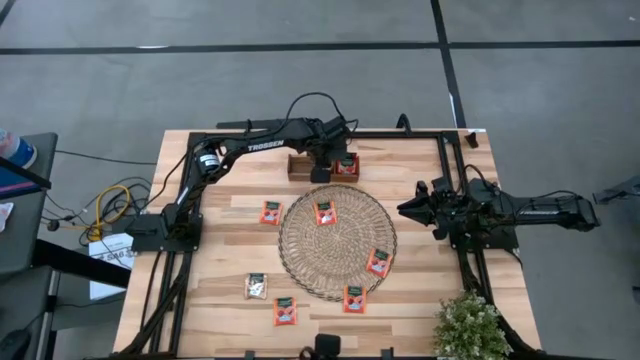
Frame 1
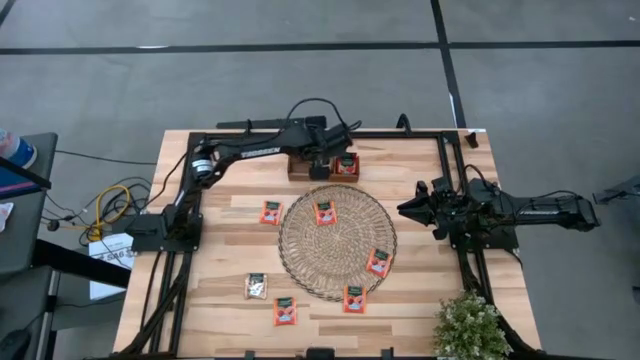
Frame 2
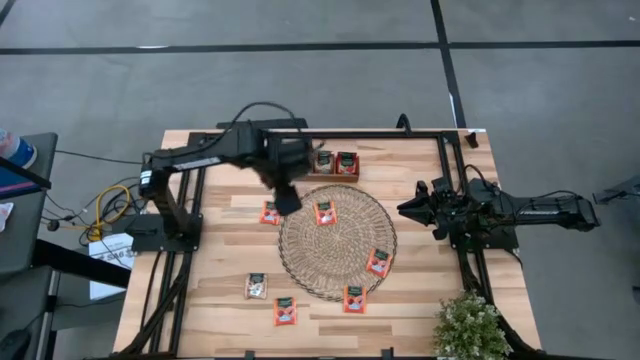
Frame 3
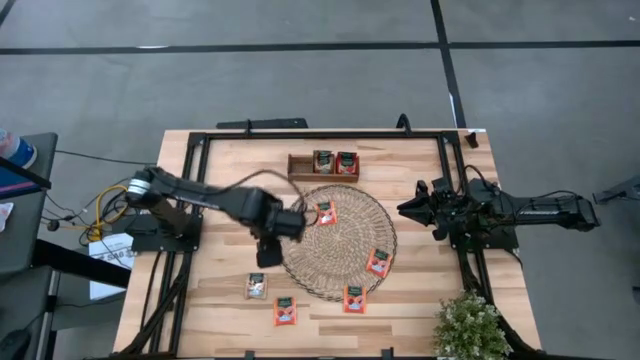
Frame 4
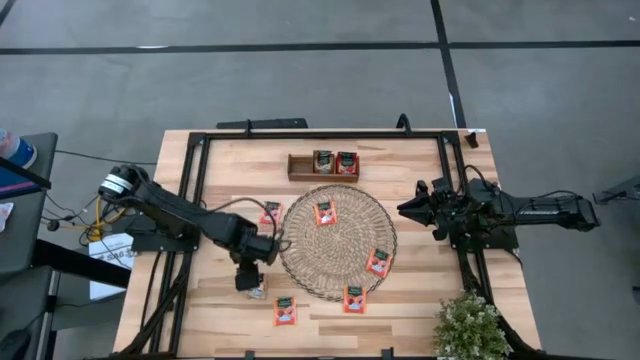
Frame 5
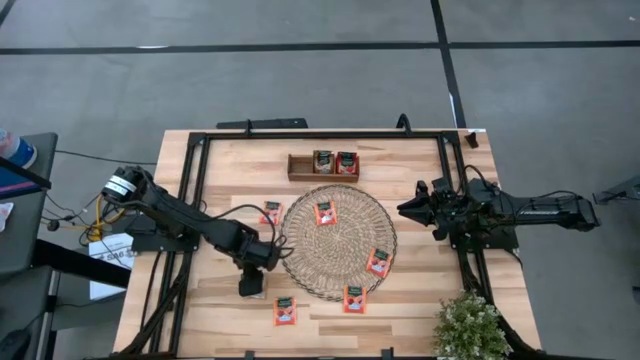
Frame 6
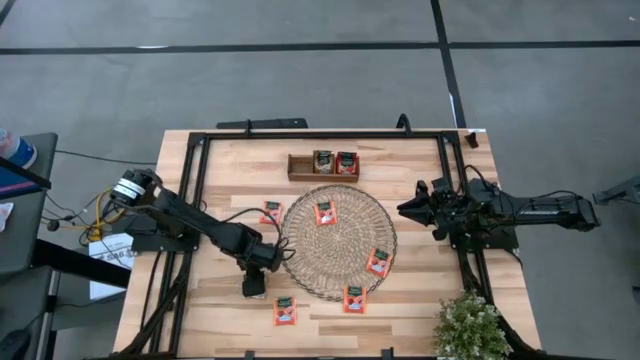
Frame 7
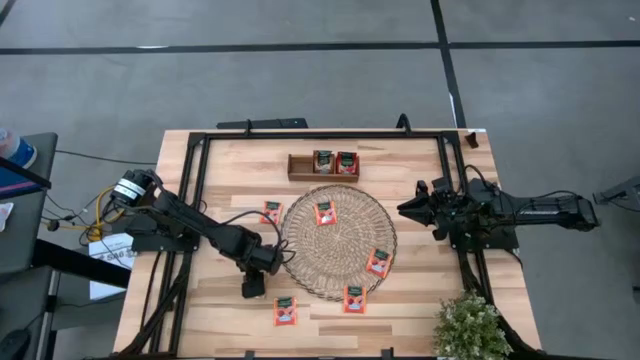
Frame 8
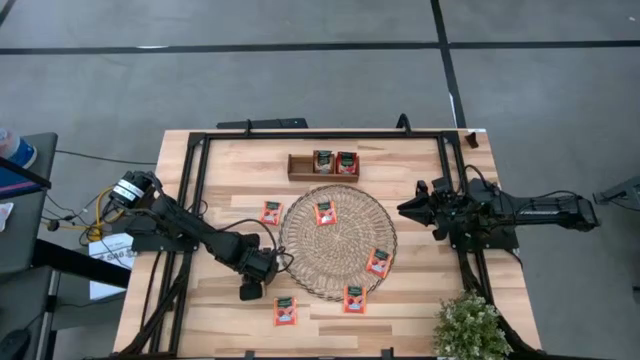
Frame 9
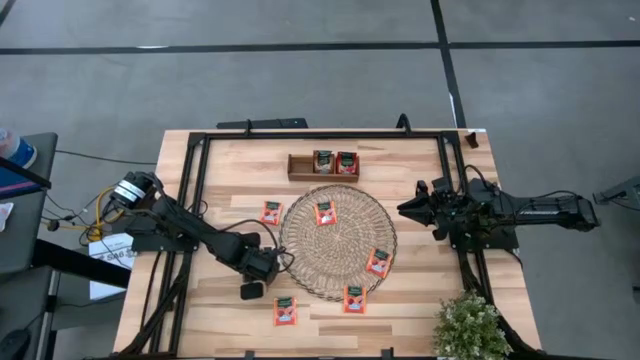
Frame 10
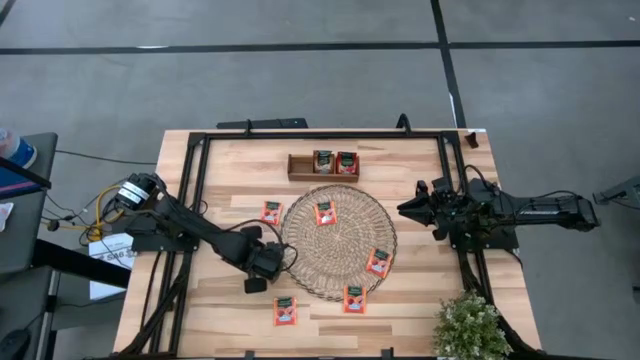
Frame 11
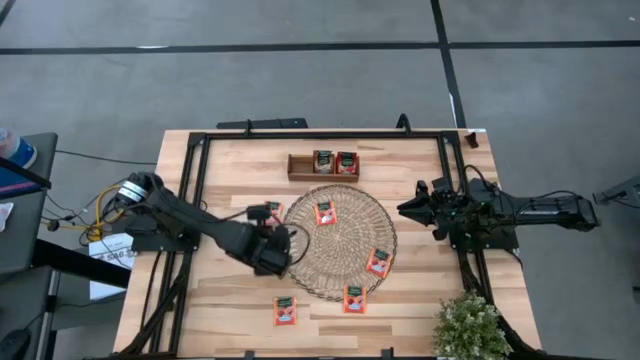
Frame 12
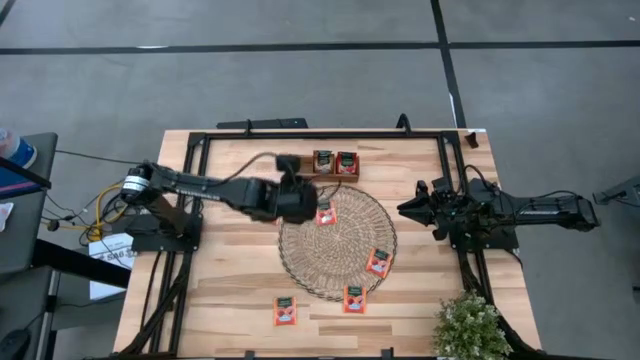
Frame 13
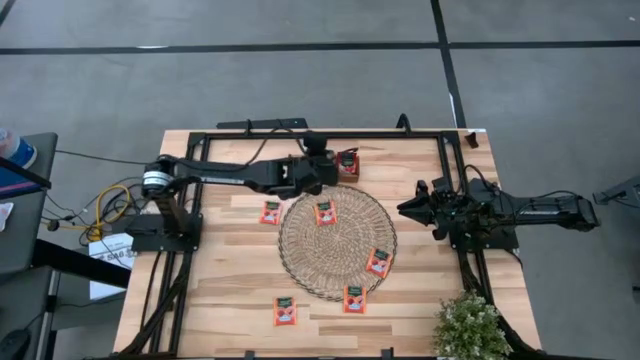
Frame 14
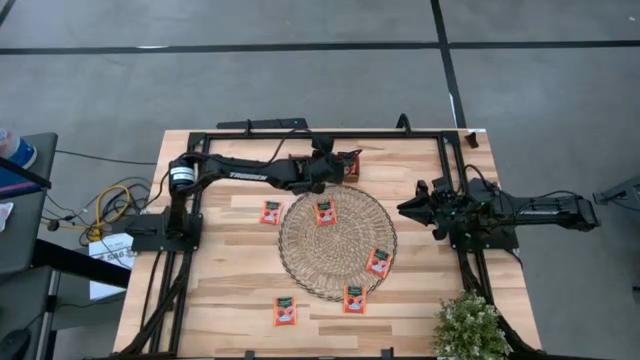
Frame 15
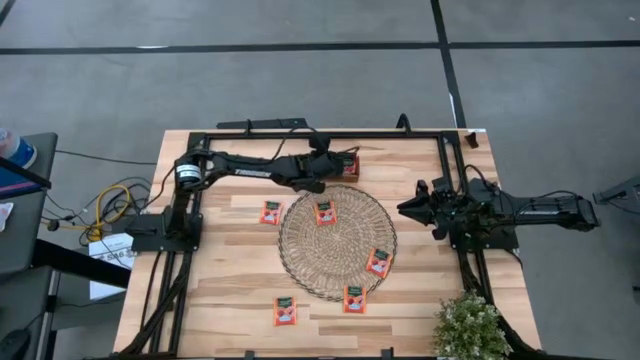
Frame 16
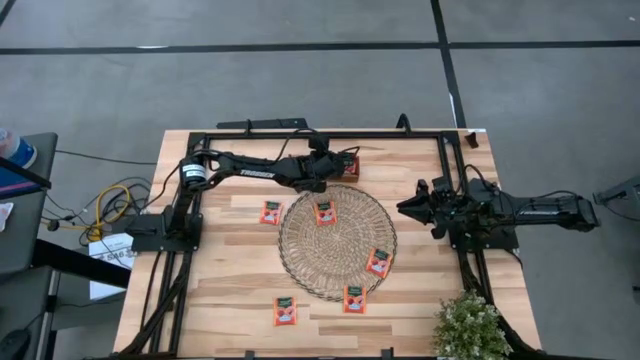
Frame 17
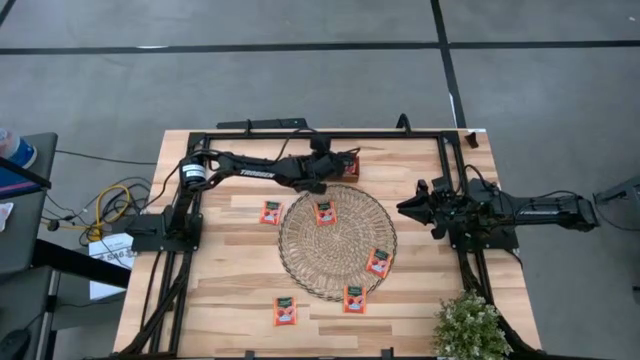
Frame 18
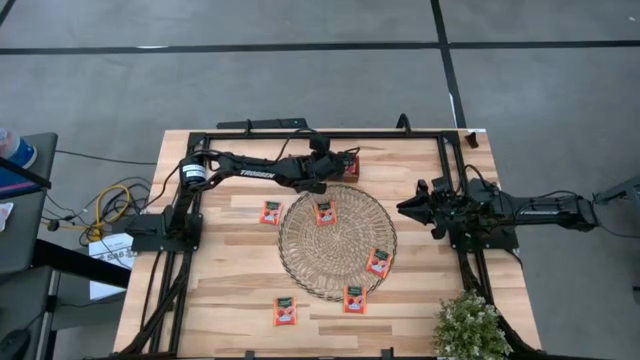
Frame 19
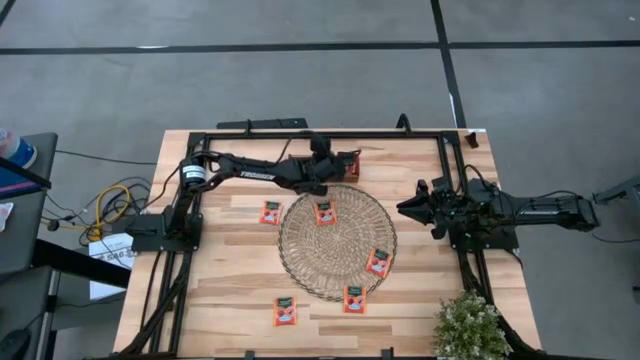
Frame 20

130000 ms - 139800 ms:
Task: Pick & Place Tea
Put the brown tea bag into the middle section of the brown wooden organizer

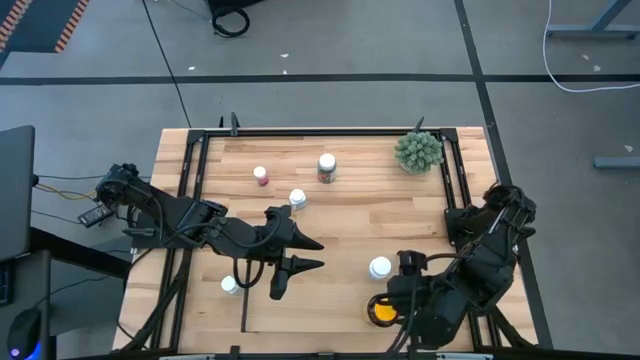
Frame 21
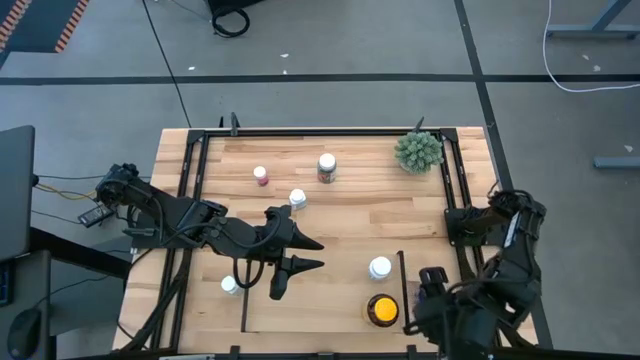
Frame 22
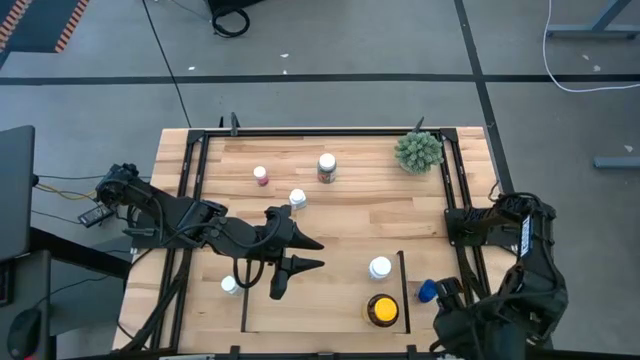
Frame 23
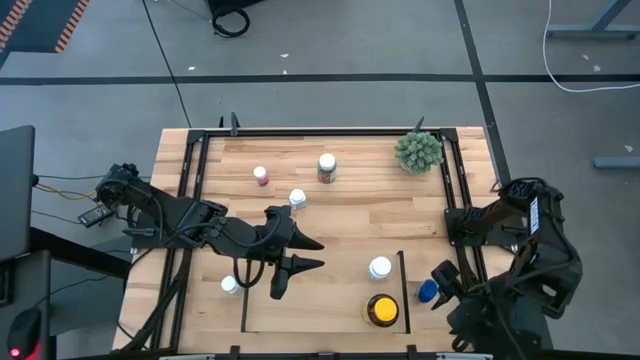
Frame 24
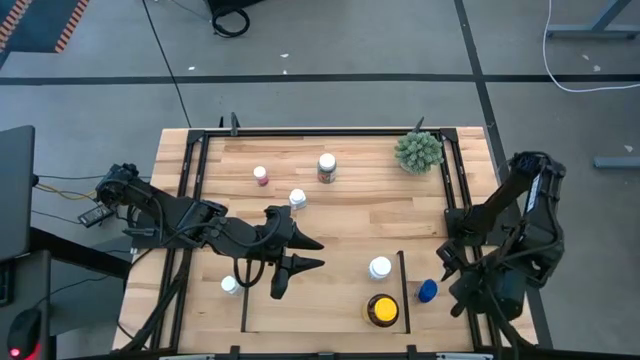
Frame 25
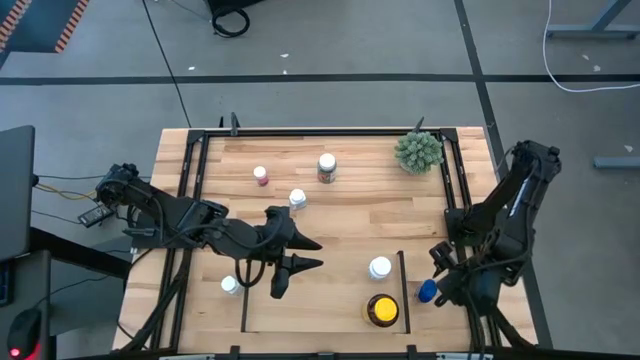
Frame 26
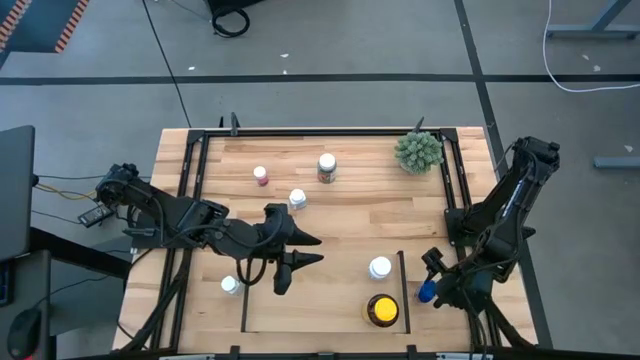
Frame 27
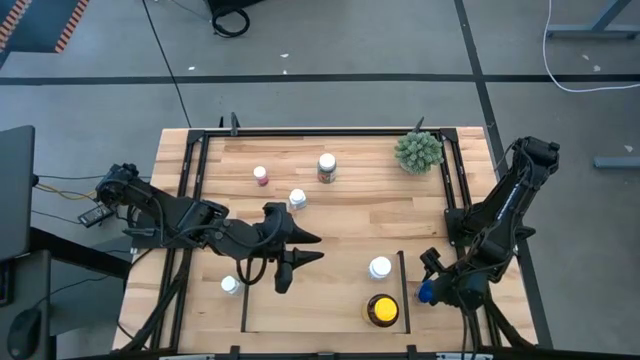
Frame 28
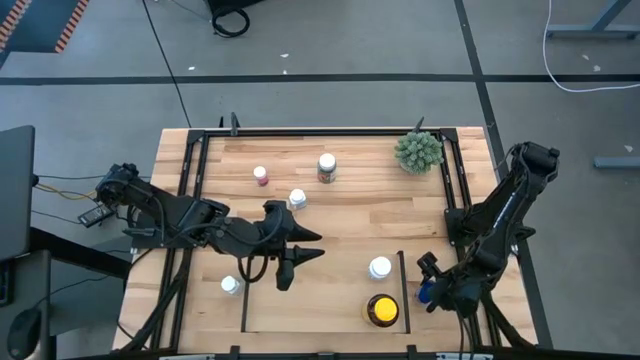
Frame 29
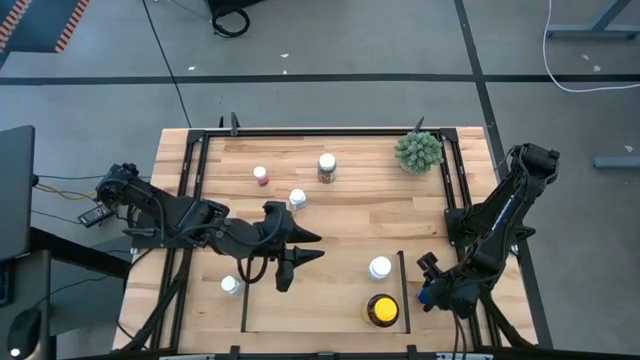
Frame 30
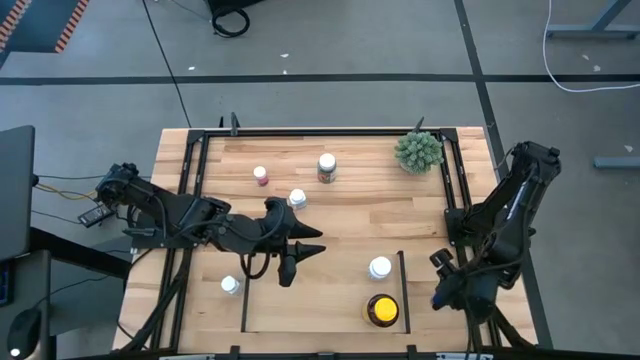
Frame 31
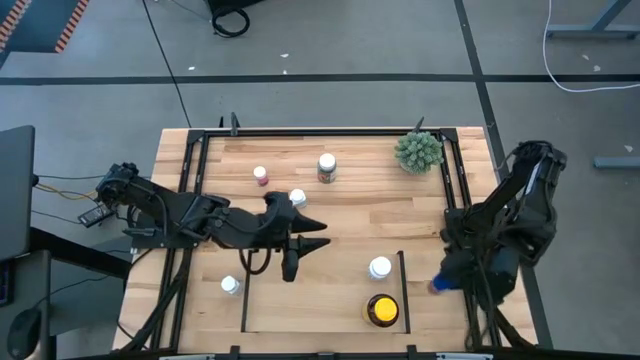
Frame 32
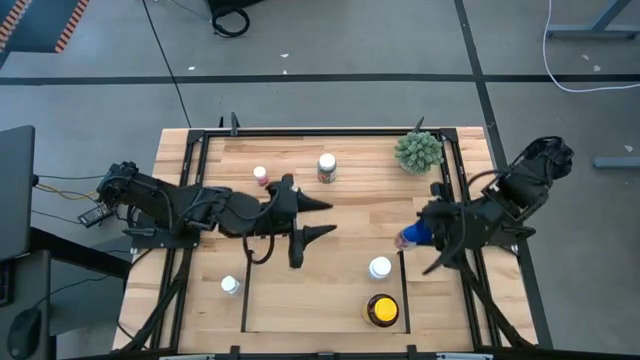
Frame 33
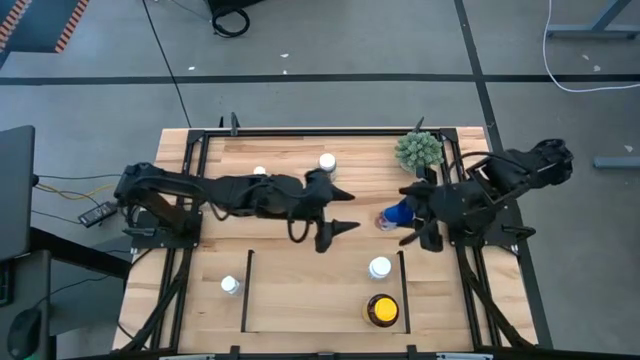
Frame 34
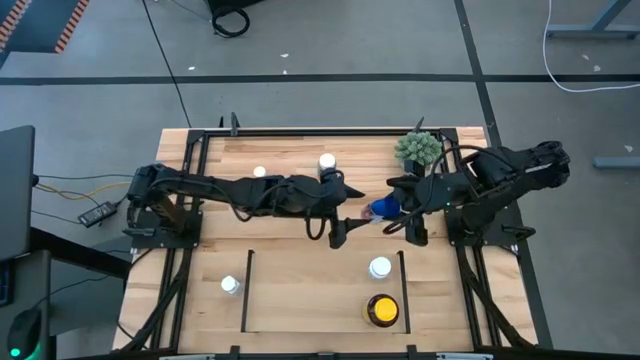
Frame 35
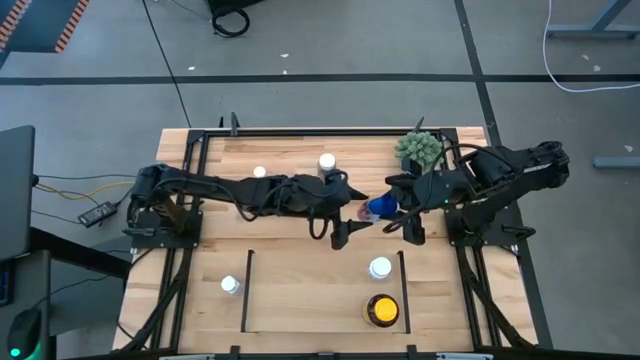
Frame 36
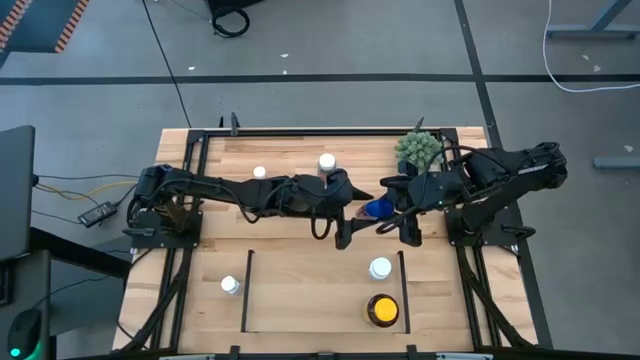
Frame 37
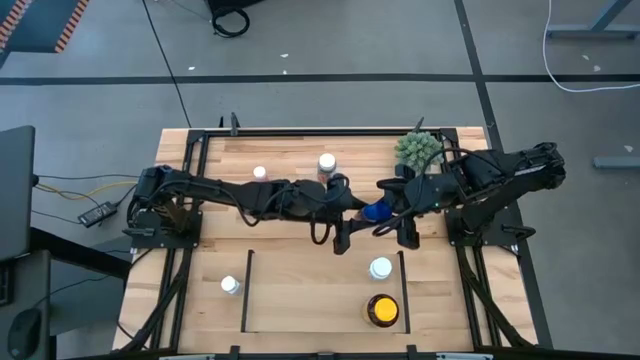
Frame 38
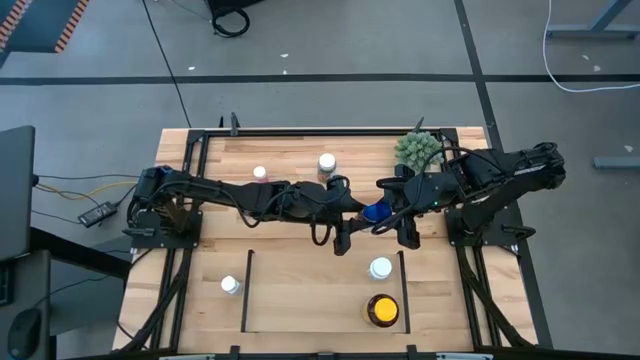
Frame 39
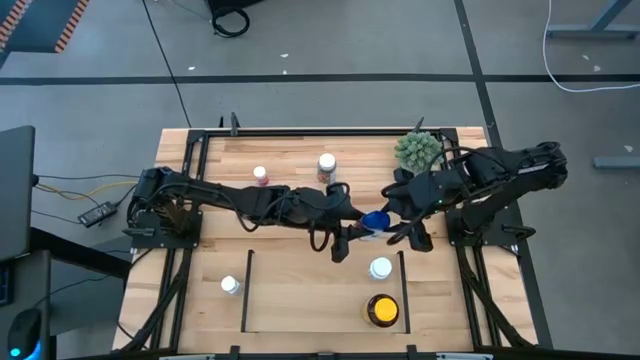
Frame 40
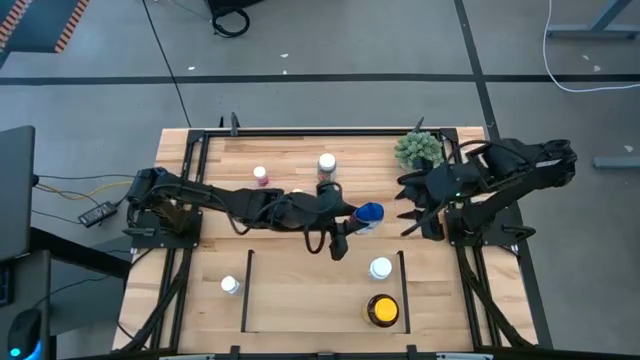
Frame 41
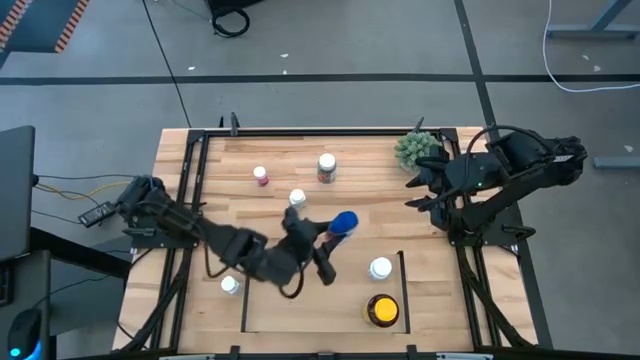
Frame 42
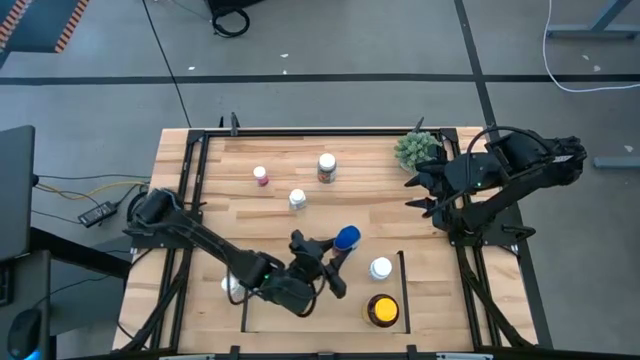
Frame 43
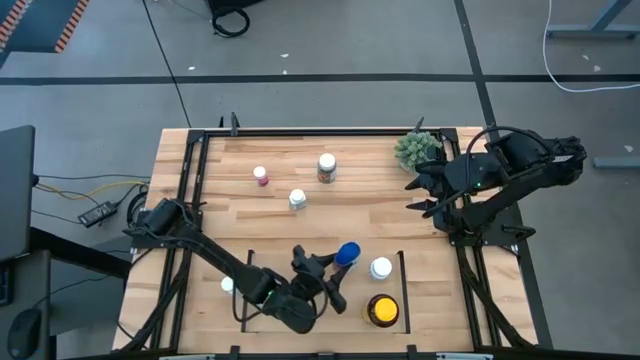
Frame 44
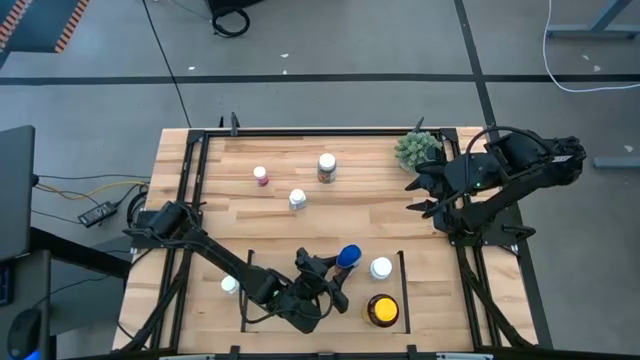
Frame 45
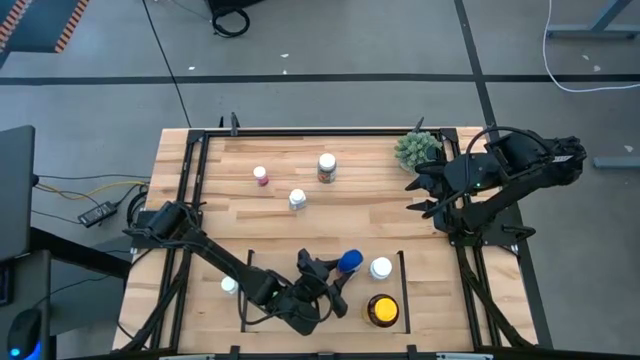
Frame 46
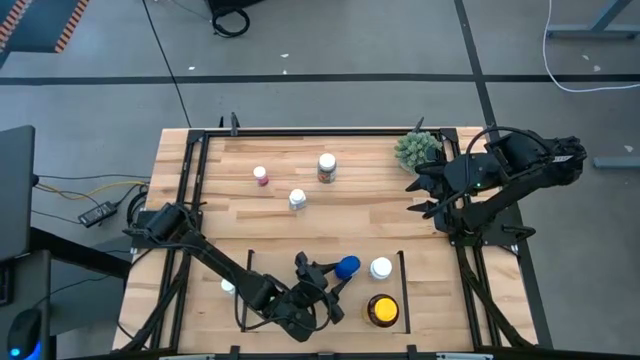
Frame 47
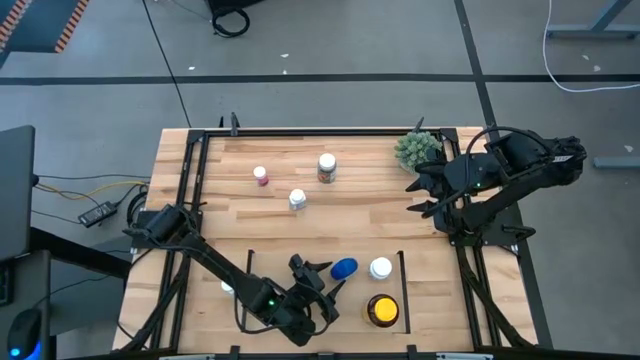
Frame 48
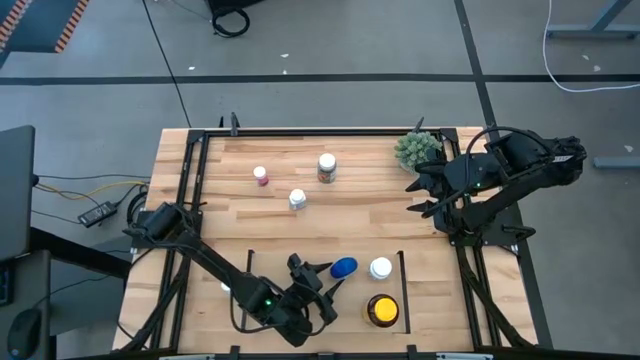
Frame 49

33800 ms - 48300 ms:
Task: Pick and place medicine bottles onto shelf by color
Put the blue medicine bottle on the shelf
